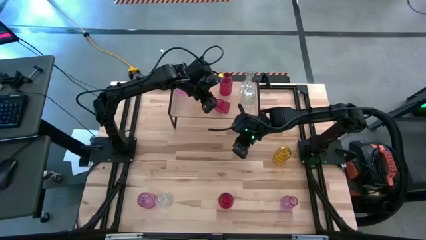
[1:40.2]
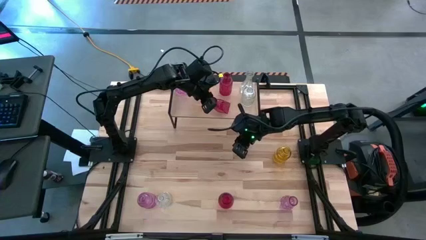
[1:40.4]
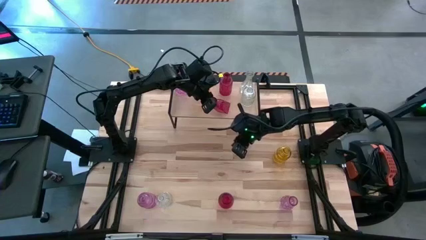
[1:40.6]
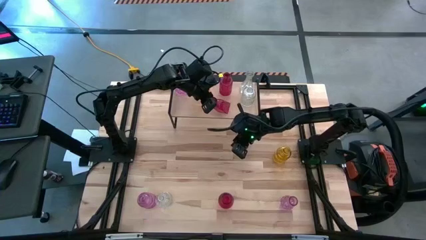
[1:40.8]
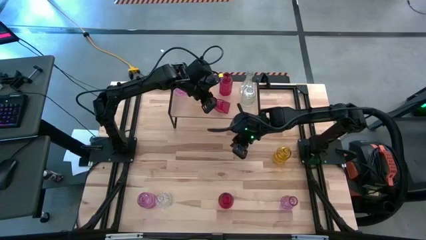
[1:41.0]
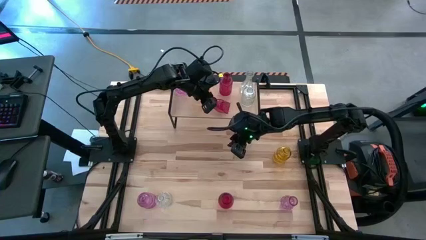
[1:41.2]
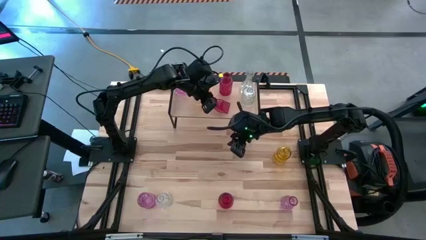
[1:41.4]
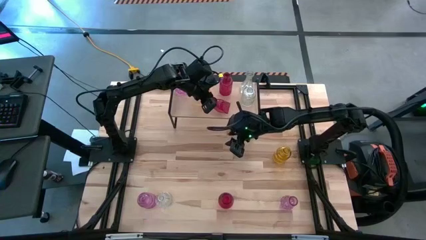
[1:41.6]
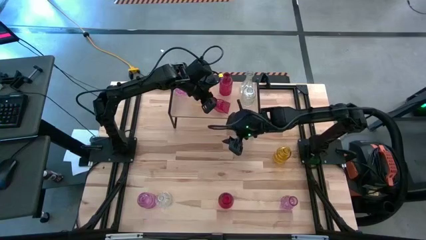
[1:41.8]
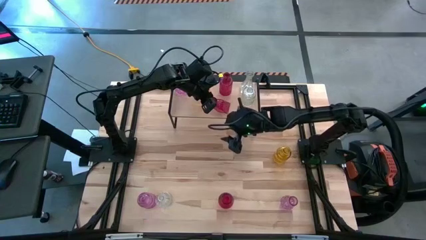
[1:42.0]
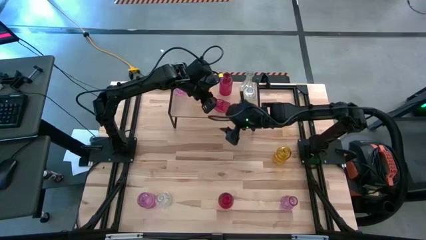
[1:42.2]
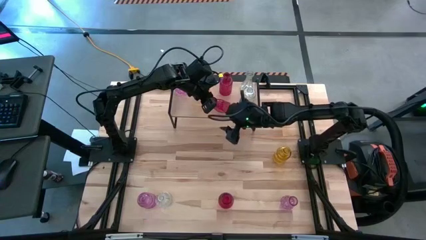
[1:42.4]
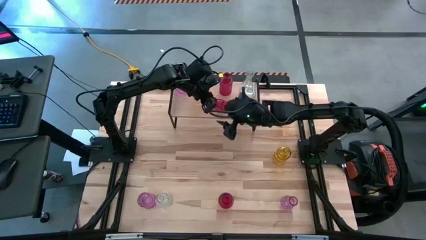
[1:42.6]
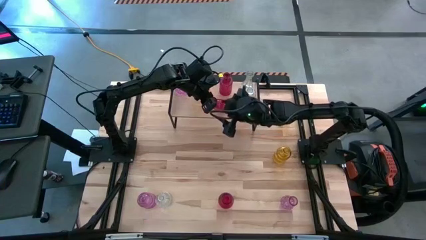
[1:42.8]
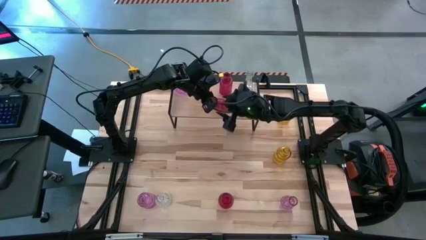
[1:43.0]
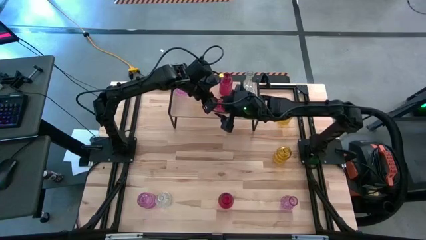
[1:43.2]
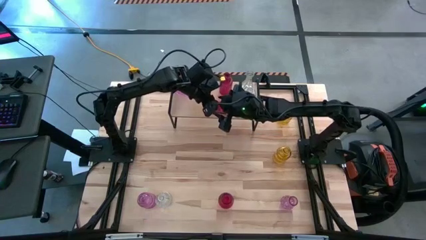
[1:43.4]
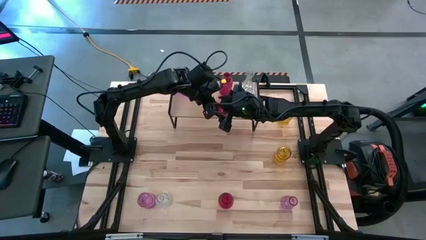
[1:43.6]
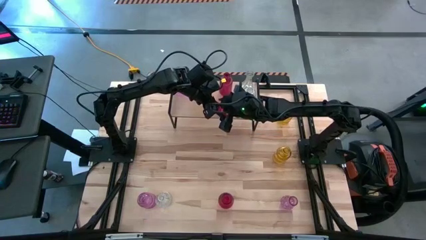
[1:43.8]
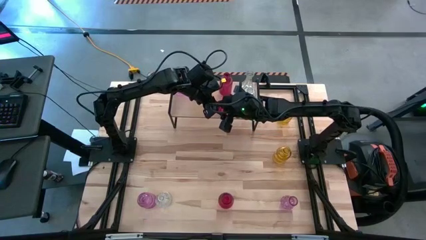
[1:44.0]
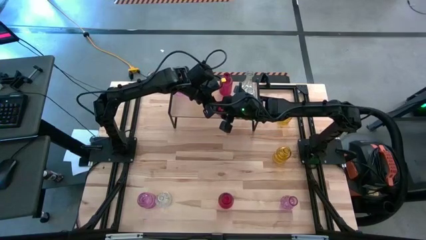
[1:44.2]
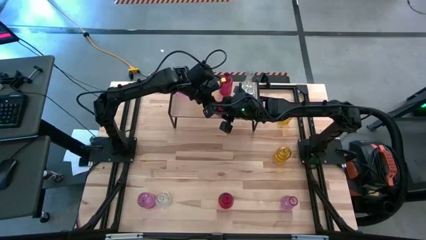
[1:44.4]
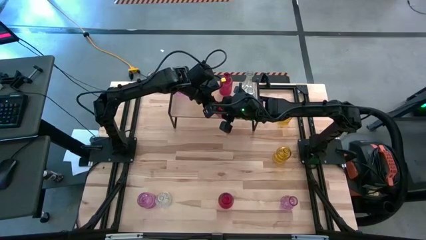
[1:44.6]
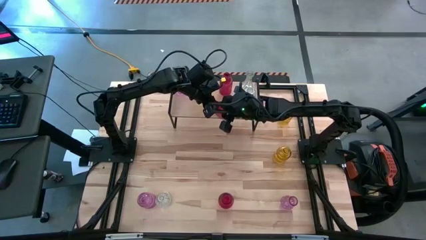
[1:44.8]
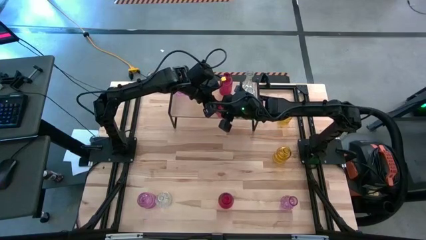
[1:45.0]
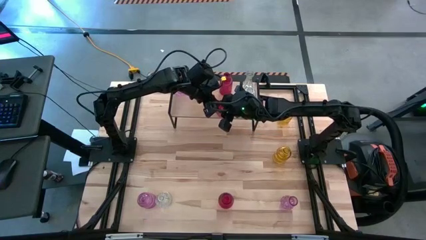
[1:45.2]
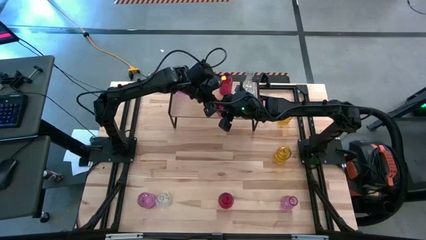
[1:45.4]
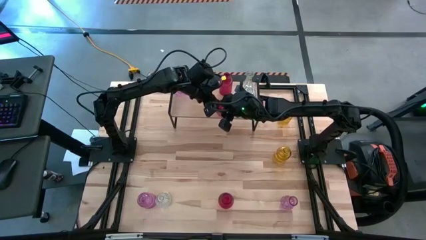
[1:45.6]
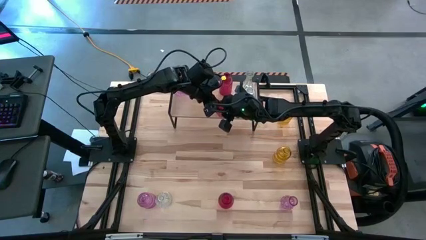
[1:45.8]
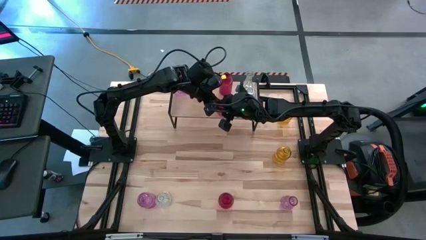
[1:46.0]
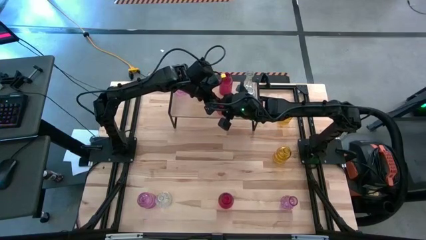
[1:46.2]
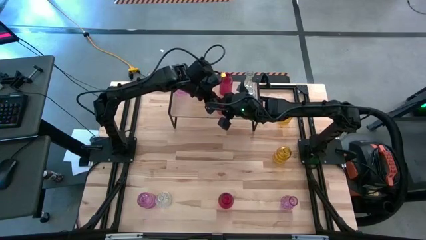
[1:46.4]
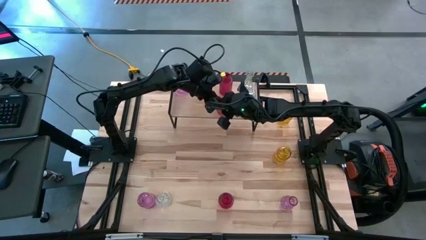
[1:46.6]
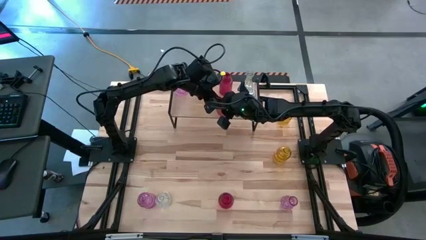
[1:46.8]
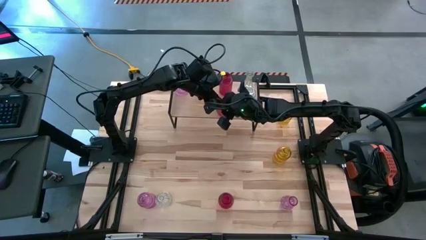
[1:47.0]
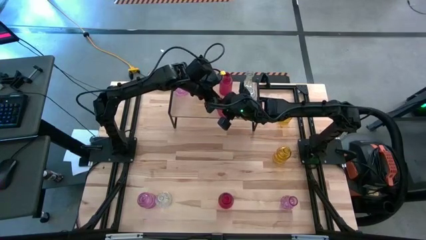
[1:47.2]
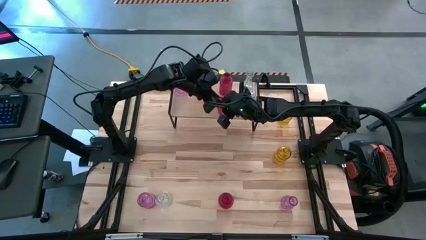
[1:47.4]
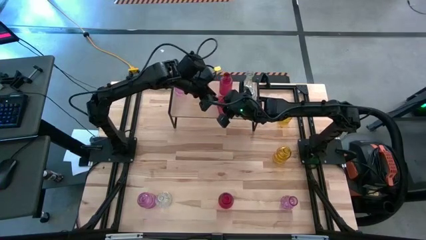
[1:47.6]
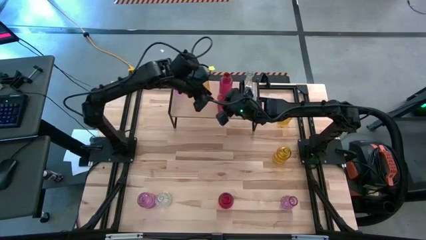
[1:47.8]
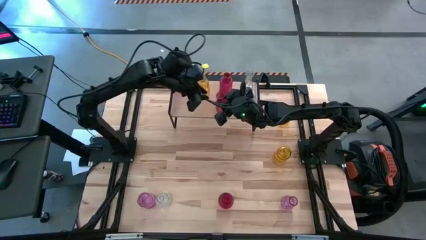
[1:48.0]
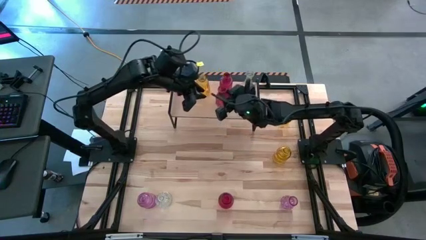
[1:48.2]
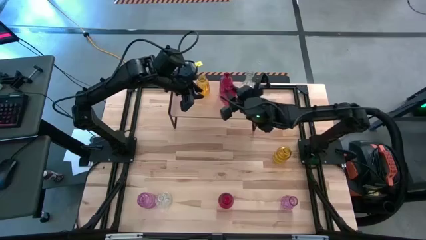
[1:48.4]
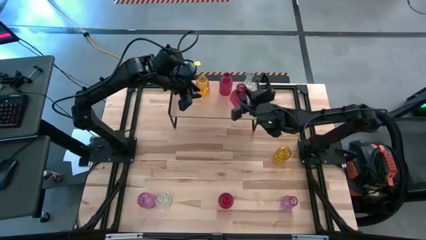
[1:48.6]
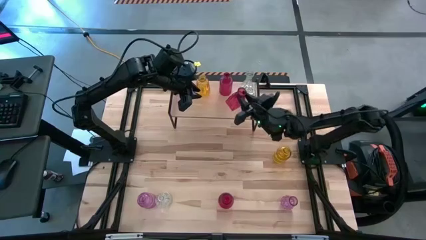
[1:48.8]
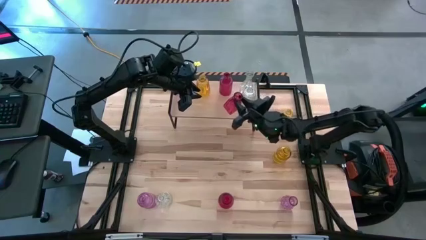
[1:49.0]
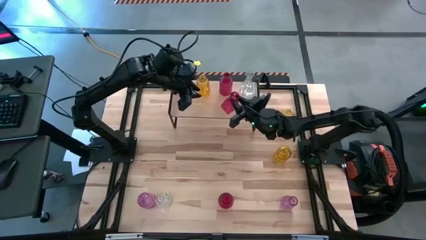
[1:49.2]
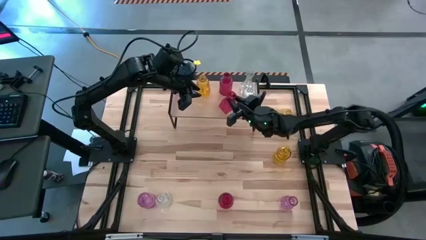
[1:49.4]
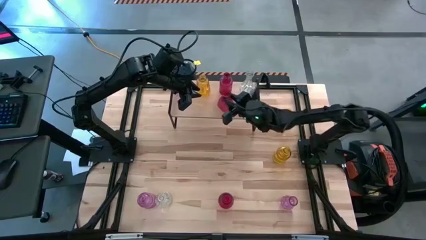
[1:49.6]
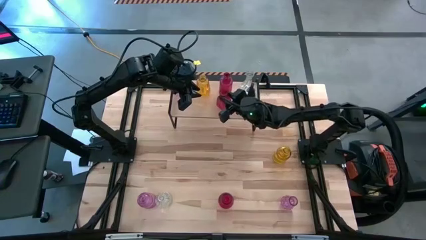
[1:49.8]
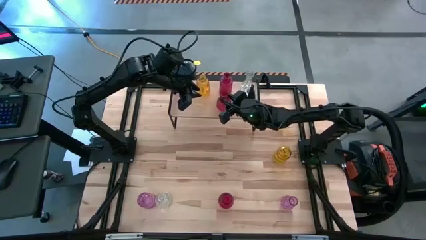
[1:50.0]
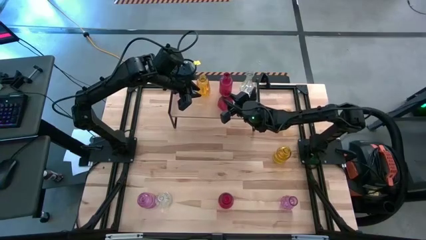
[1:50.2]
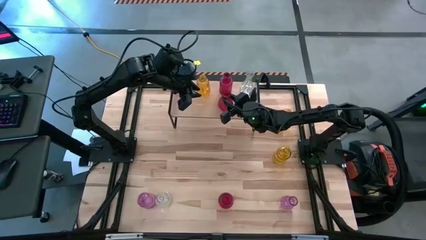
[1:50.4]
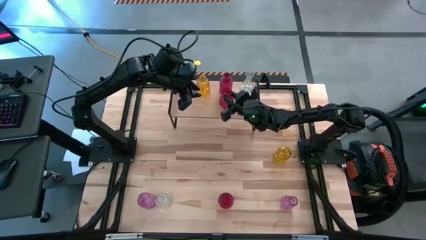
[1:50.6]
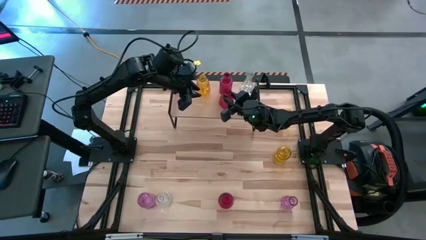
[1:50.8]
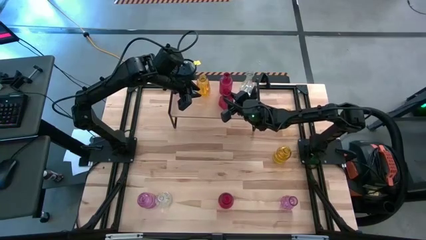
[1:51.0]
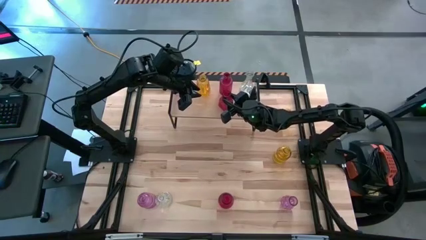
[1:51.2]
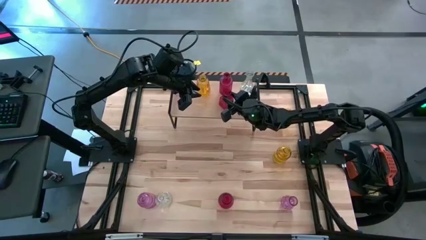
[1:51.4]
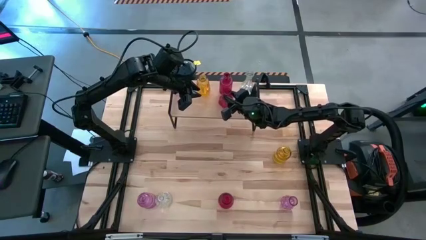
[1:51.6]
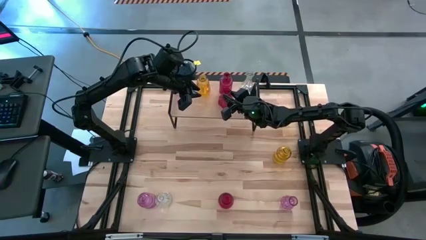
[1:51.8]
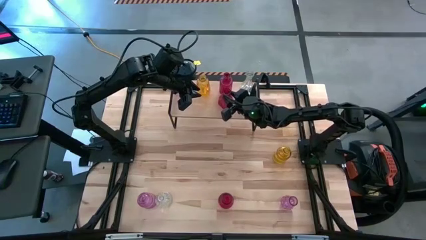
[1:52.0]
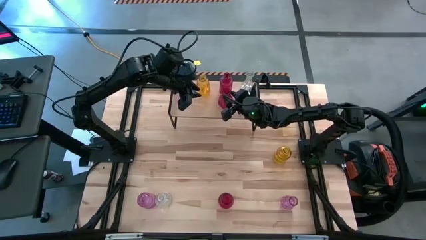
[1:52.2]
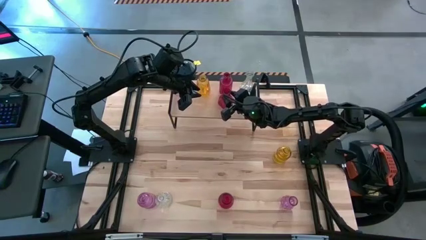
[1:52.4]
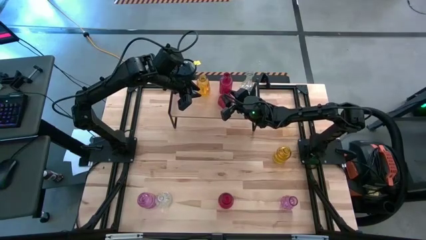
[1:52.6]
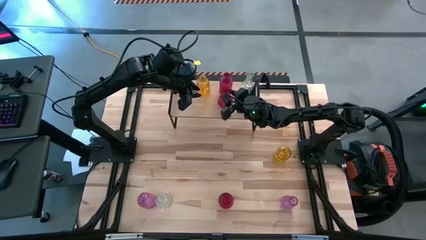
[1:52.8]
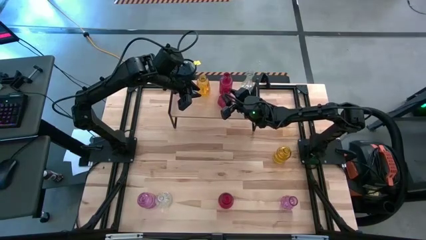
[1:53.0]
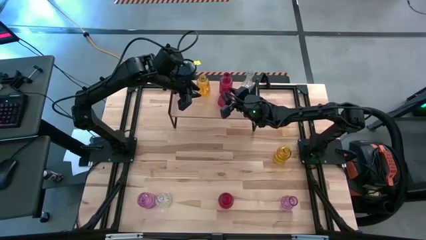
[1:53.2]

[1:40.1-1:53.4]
Task: sort vases onto shelf
Put the top red vase on the shelf and align it with the other red vase

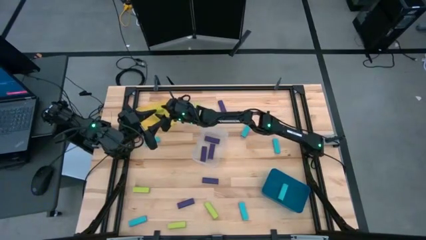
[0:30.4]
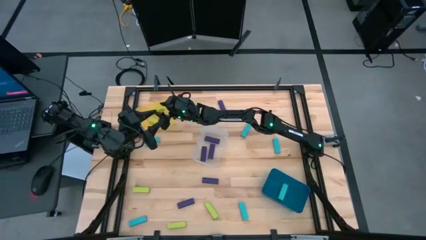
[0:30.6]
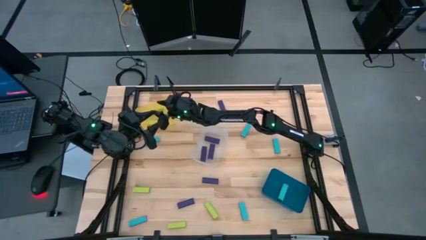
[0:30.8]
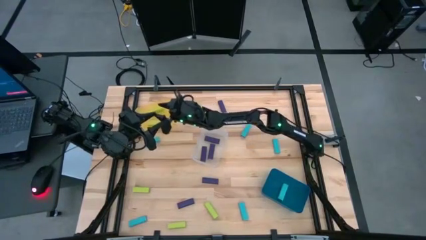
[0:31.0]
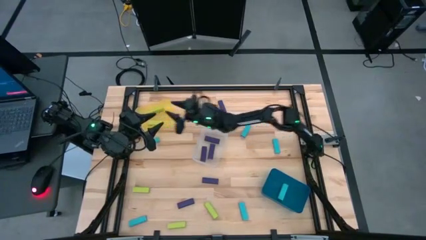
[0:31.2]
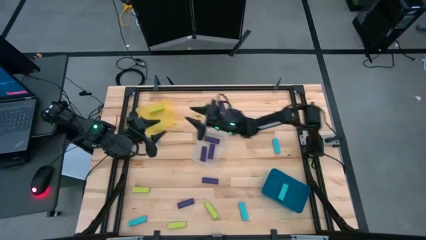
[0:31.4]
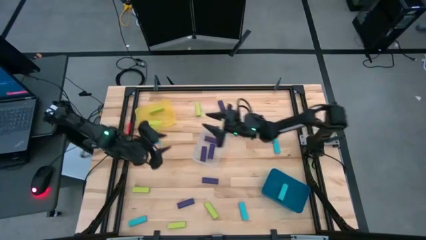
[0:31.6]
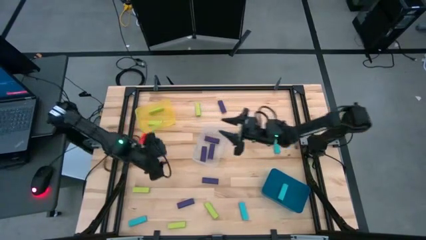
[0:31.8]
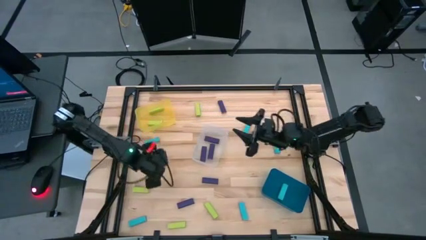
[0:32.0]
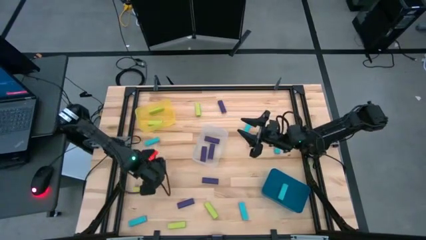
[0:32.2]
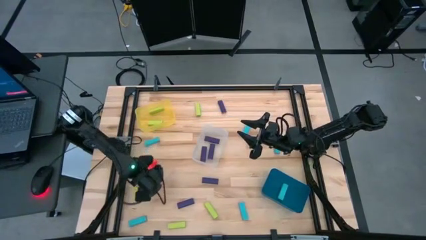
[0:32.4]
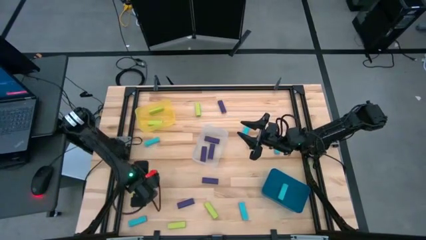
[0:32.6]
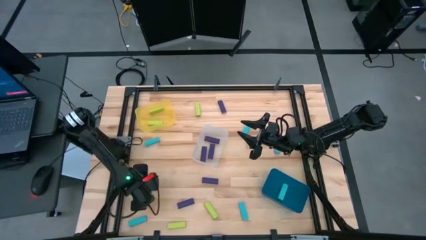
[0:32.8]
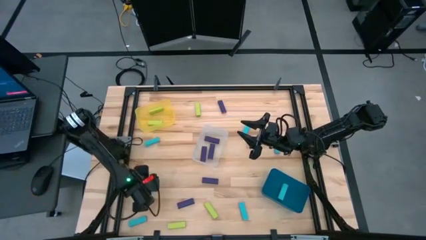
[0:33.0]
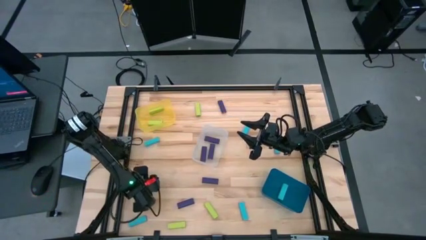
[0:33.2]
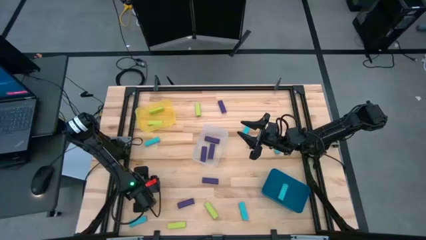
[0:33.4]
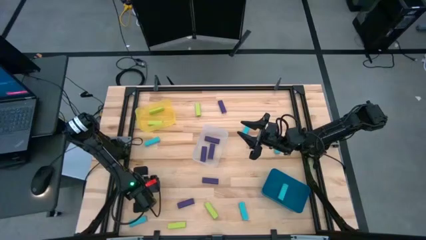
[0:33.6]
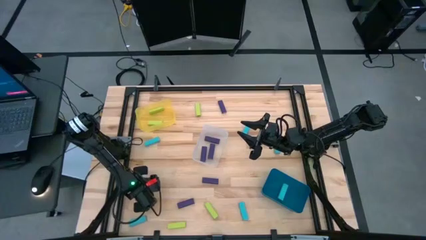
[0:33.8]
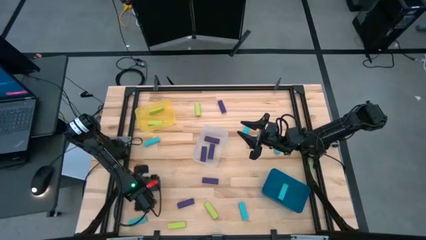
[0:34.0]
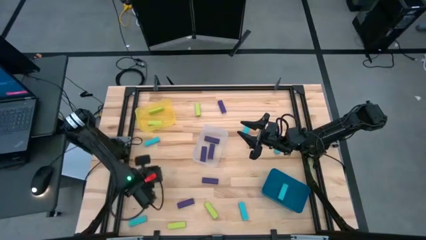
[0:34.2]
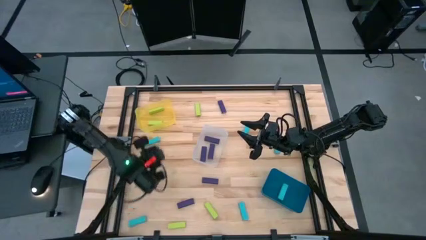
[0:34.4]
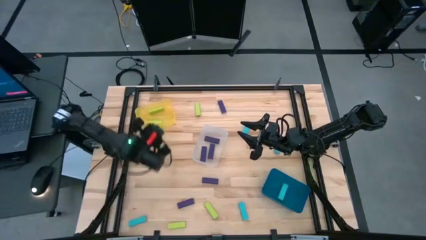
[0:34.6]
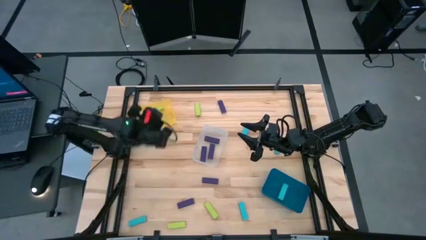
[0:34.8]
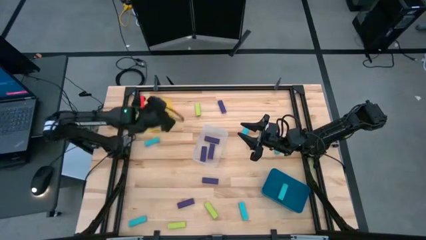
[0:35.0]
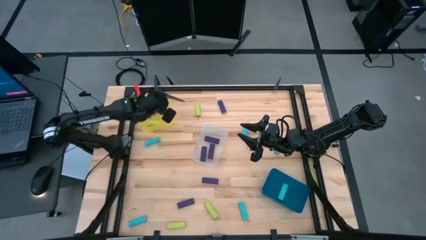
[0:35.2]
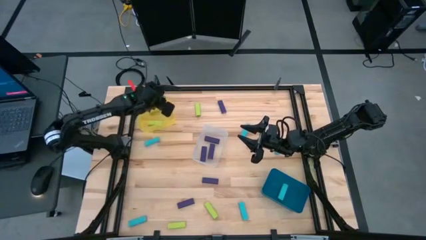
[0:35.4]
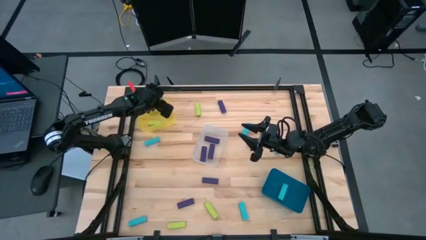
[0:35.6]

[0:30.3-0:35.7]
Task: Sort blocks
Put the green block into the yellow bin
